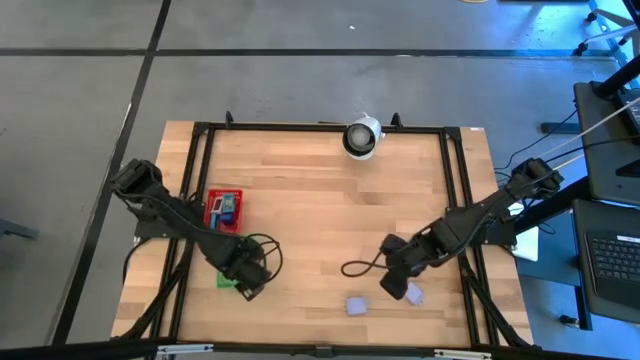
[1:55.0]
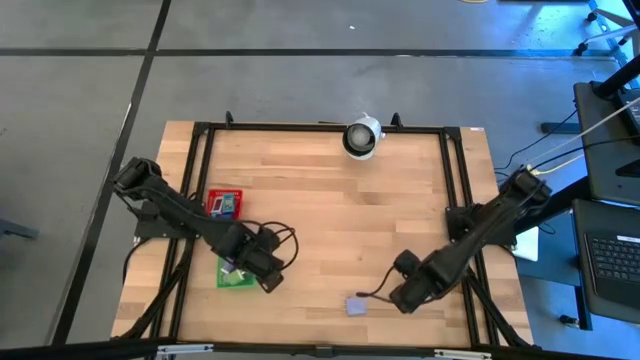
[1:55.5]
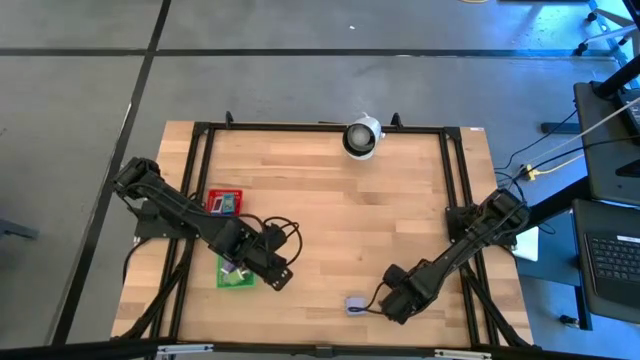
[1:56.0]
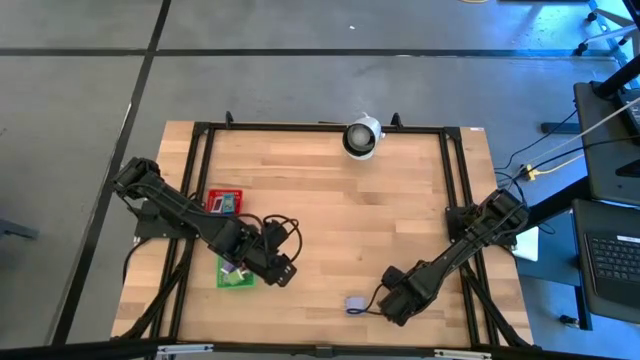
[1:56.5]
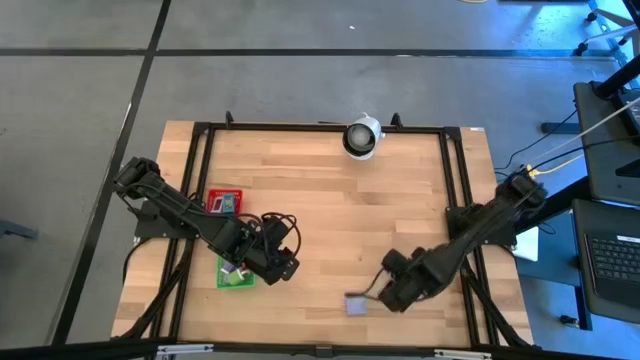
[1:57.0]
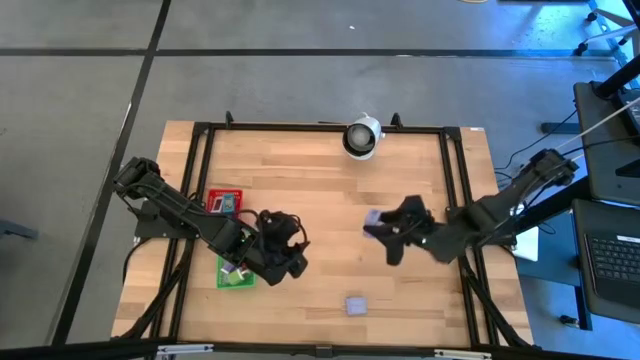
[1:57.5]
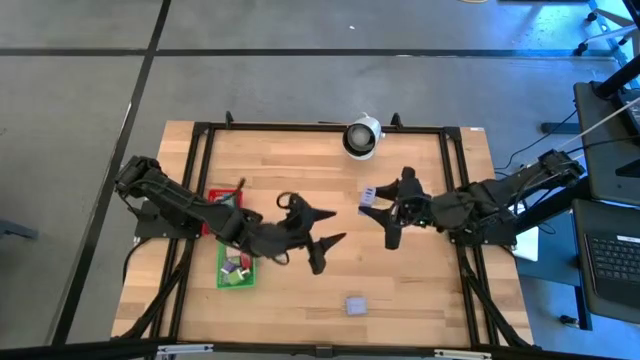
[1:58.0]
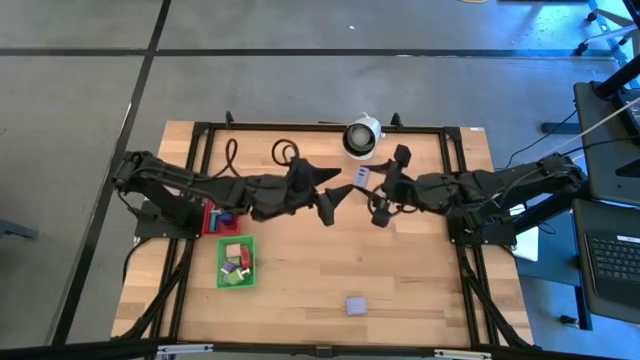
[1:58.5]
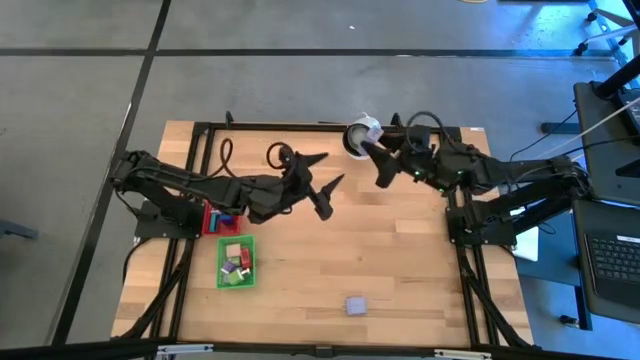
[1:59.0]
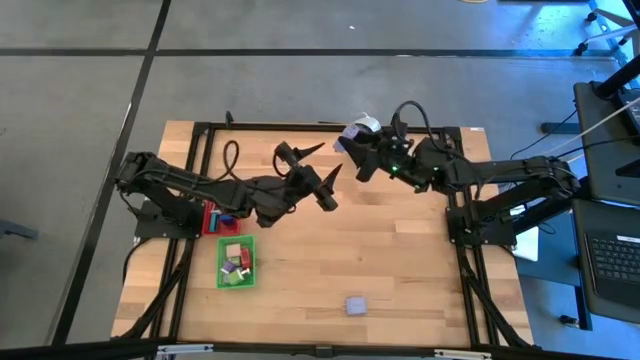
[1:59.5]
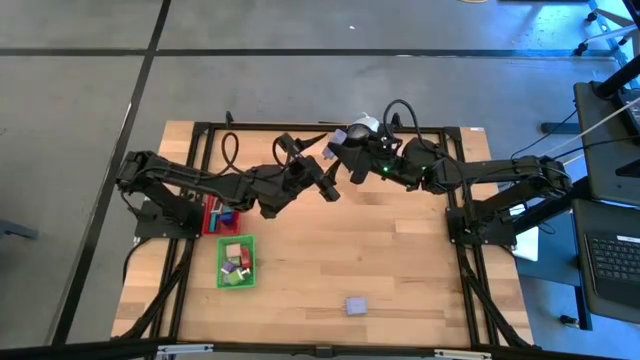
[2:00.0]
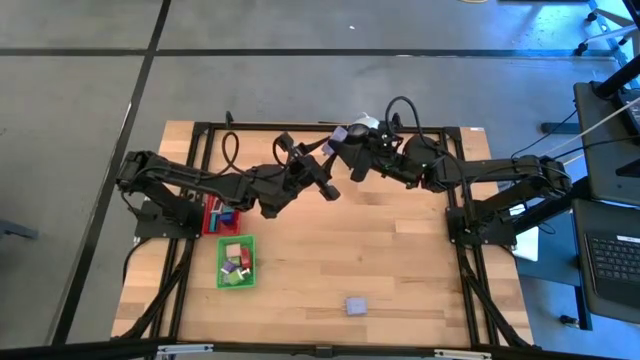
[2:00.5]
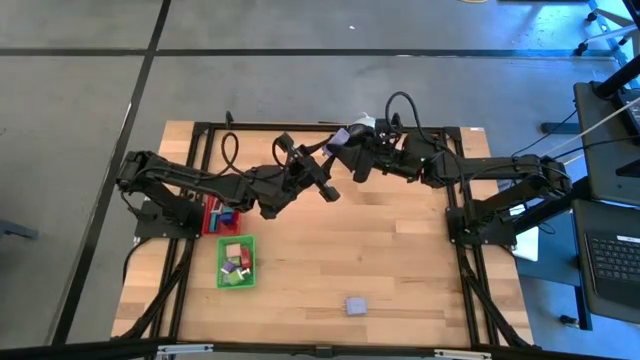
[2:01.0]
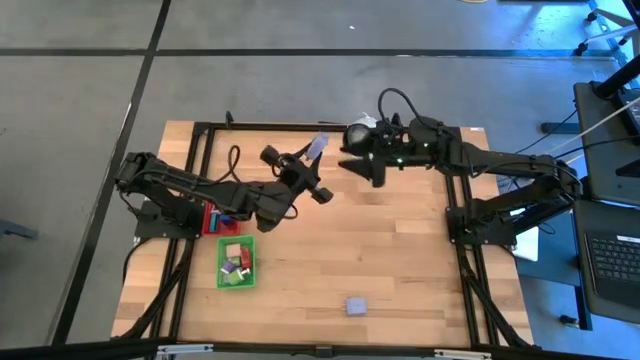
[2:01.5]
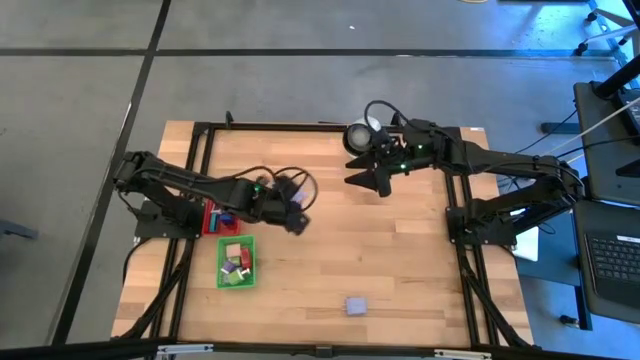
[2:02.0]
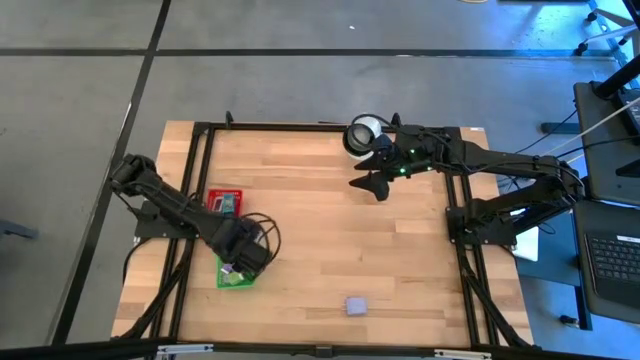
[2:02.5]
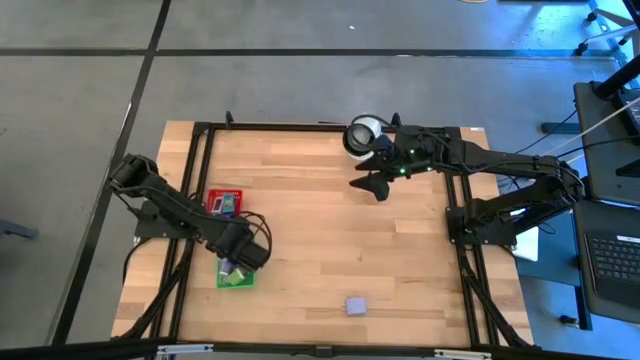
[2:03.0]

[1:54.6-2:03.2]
Task: Pick & Place Office items
Put the right purple charger adapter into the green bin

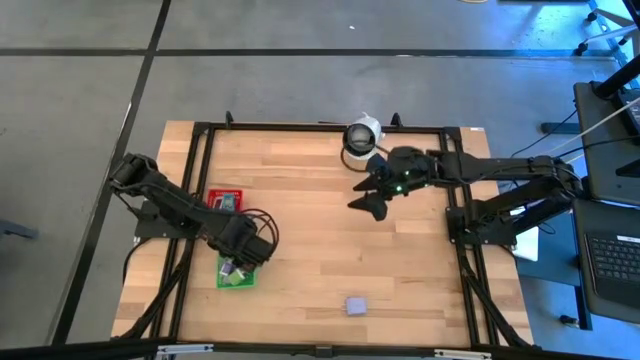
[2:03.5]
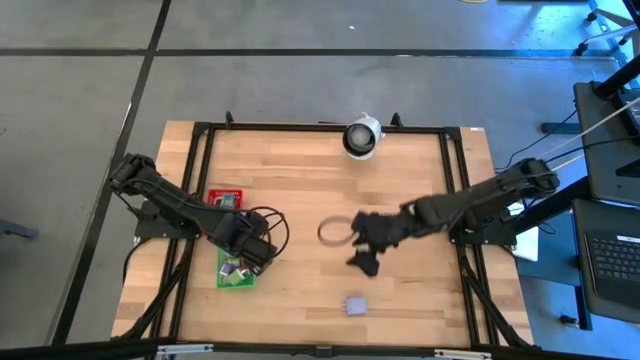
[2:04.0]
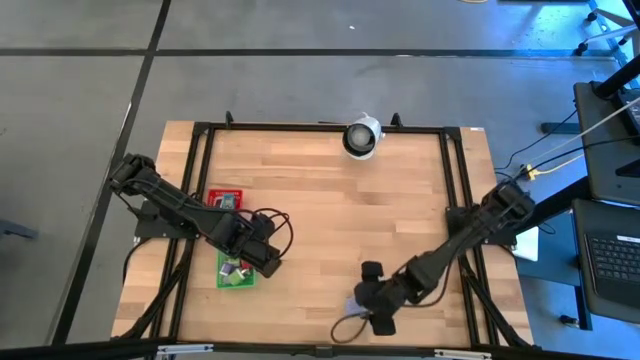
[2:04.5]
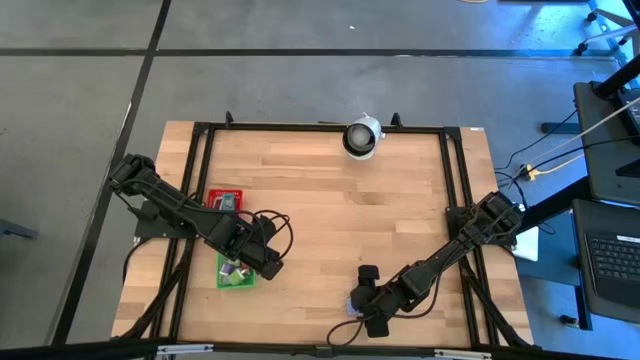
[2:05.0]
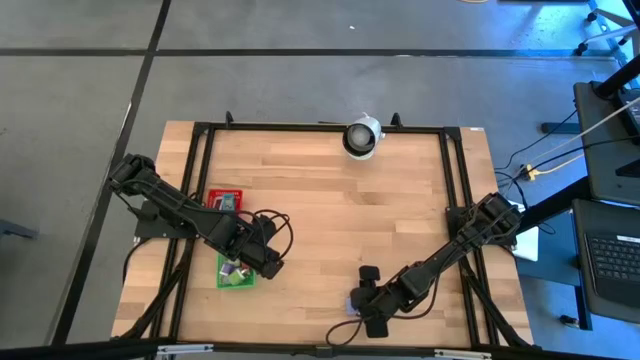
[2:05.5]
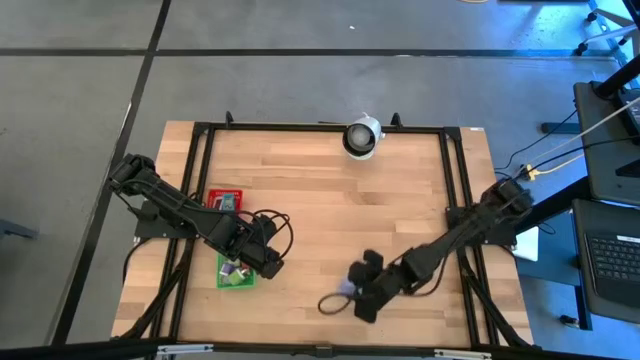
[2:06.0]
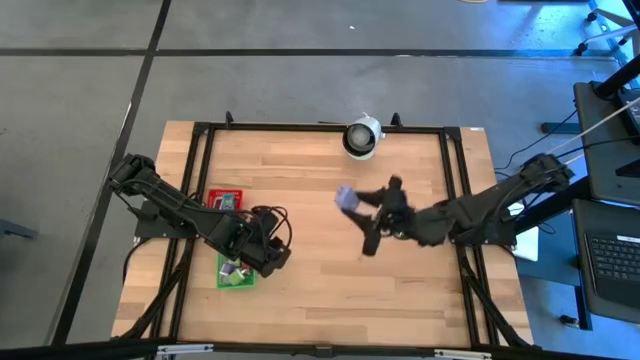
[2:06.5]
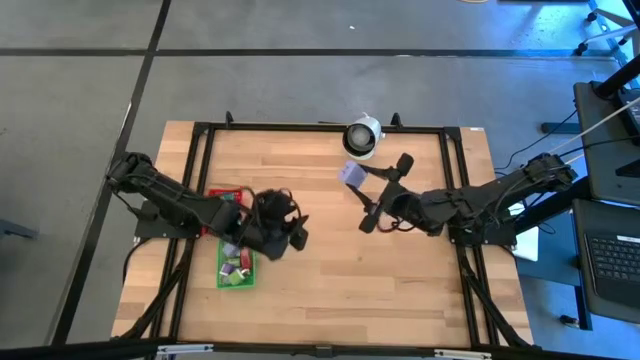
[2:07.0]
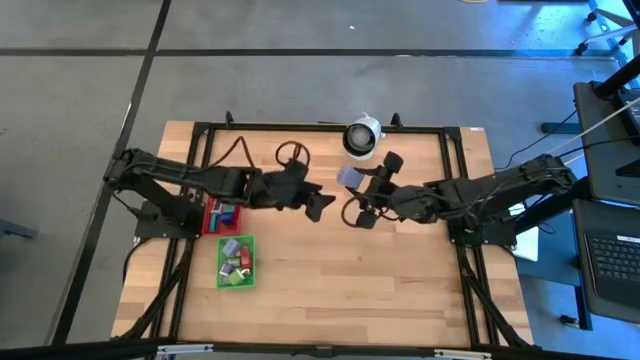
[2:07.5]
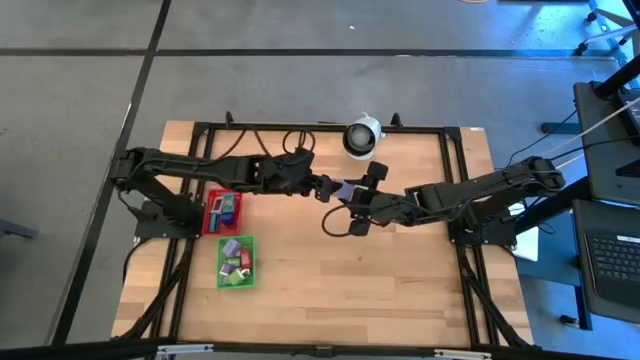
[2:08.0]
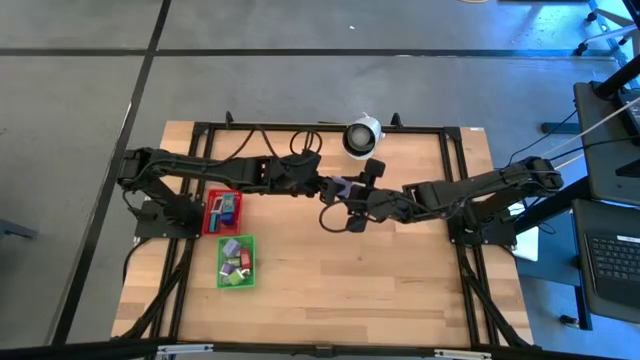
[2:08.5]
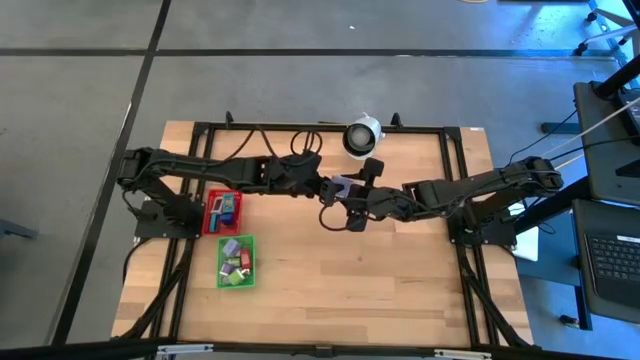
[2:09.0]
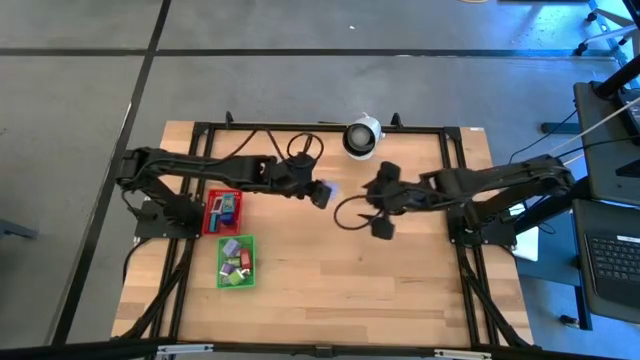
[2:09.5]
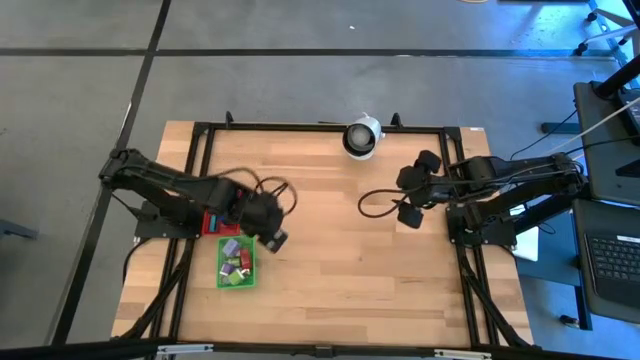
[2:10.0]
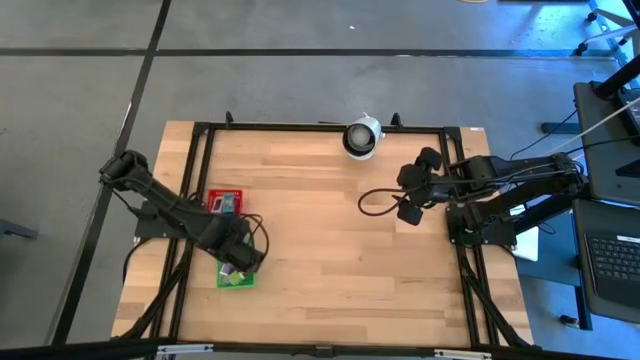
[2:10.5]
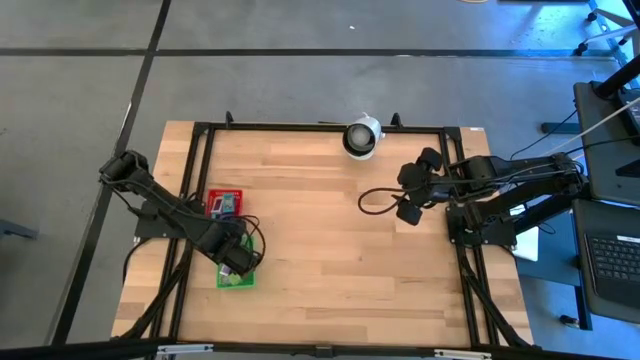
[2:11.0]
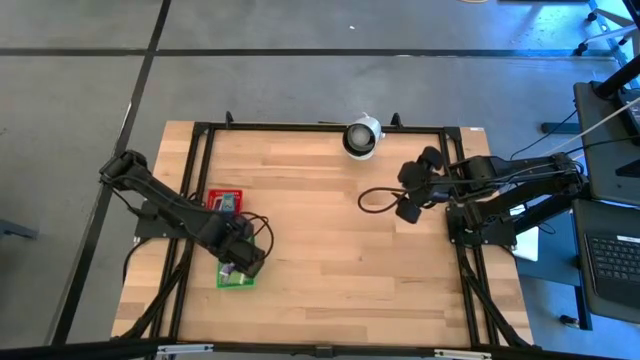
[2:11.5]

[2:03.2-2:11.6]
Put the purple charger adapter into the green bin

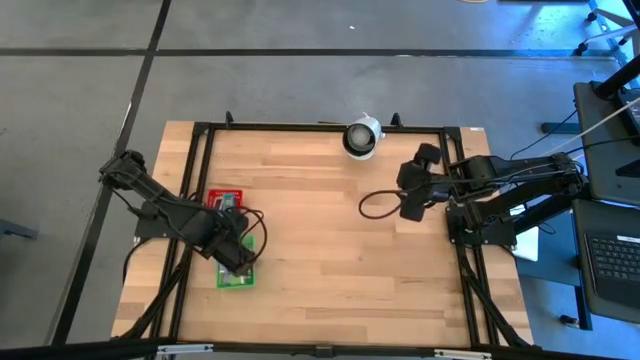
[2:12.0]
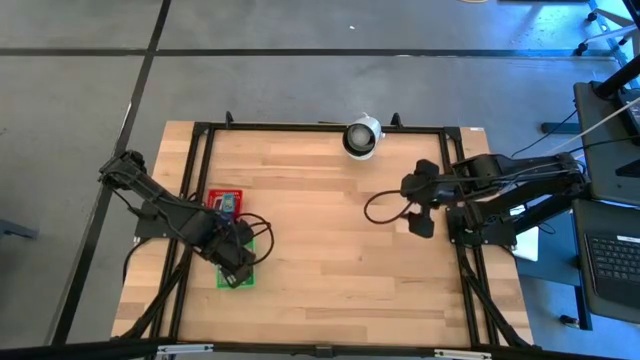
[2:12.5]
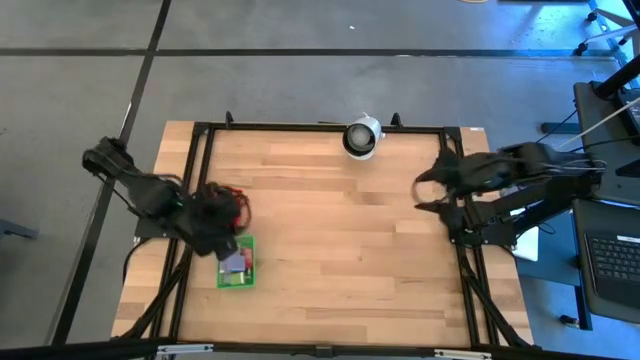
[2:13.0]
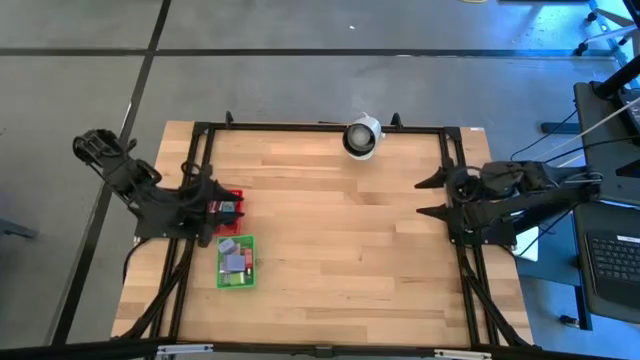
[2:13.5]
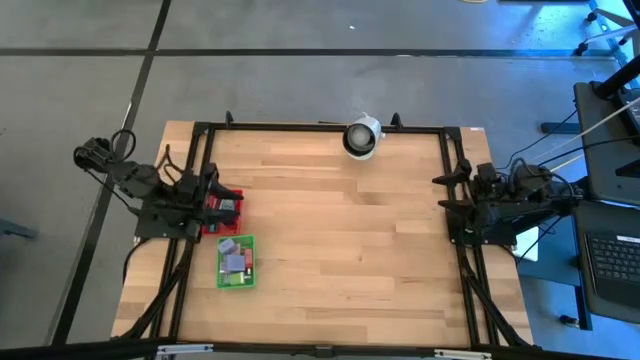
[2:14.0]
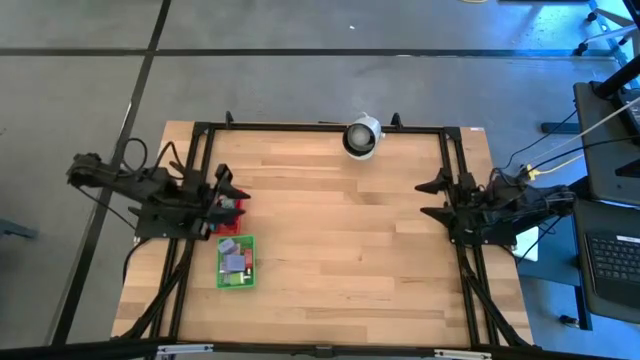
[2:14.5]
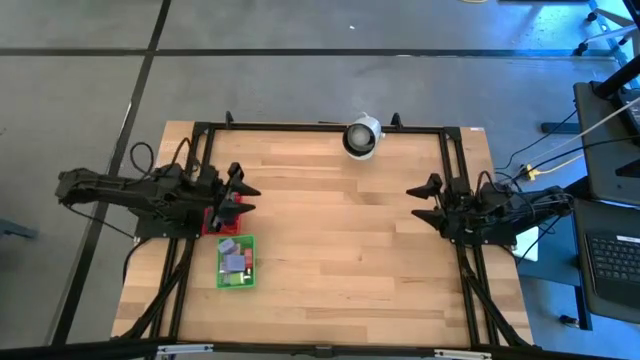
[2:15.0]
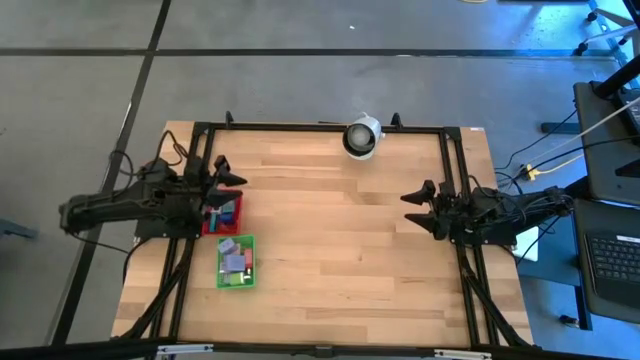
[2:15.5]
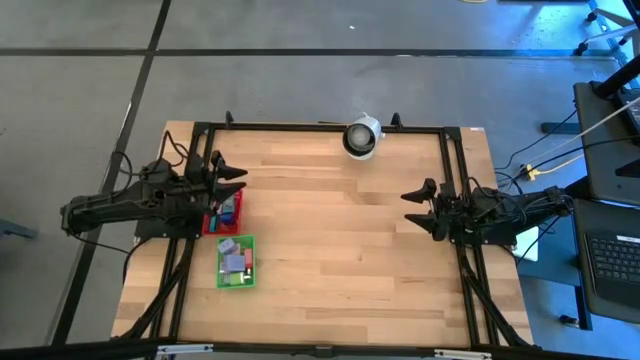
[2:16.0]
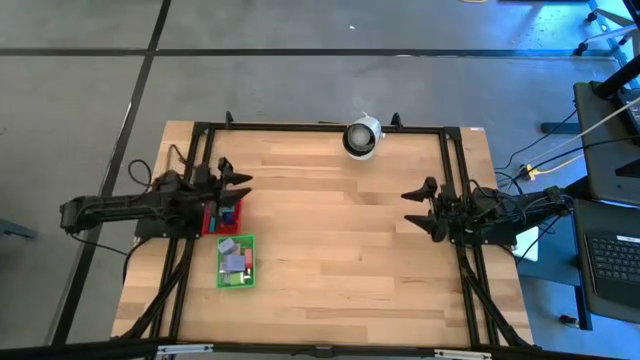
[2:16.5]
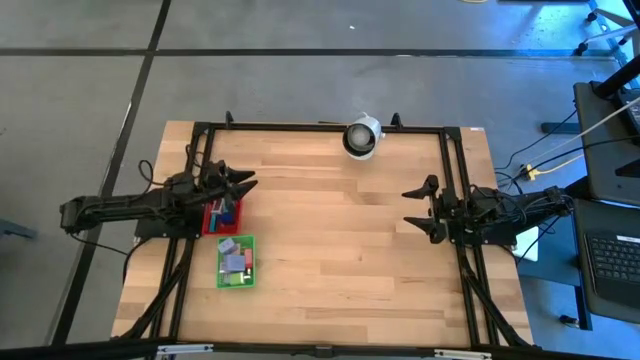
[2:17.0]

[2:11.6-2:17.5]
Return to Home Position
